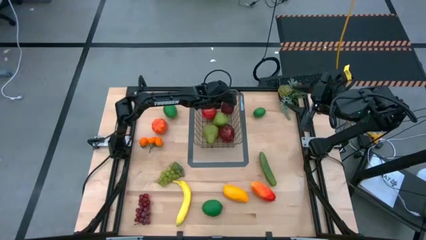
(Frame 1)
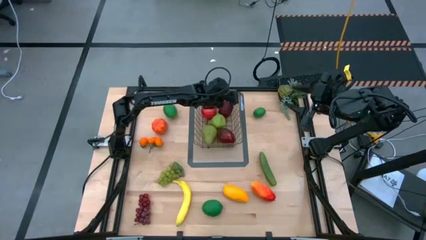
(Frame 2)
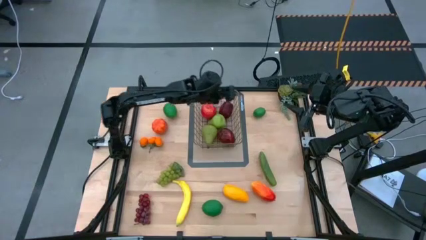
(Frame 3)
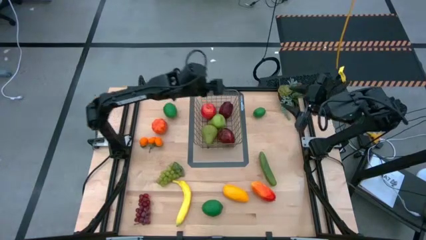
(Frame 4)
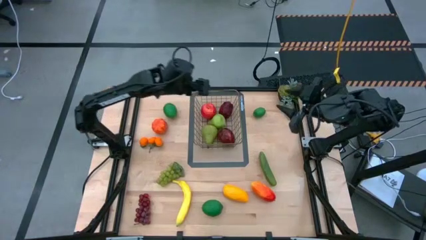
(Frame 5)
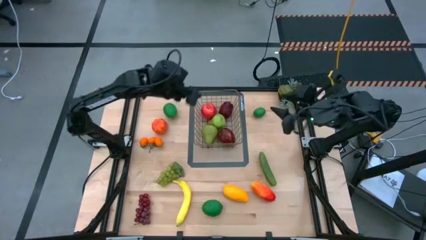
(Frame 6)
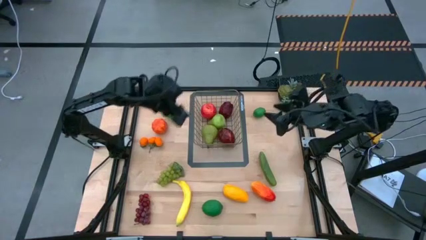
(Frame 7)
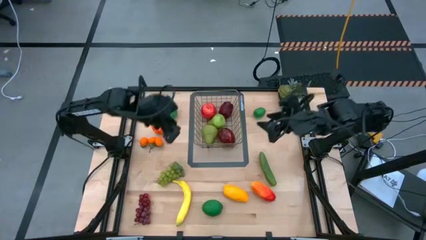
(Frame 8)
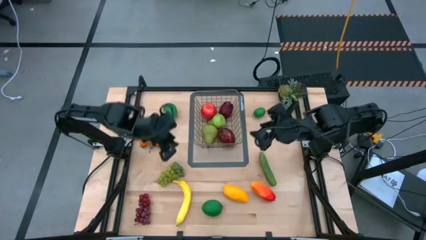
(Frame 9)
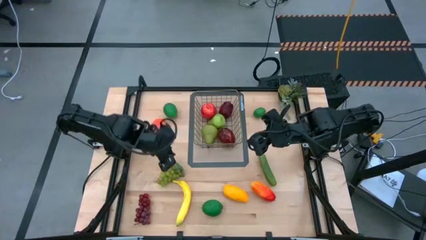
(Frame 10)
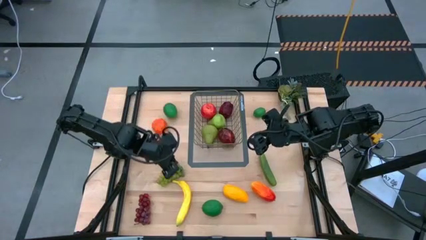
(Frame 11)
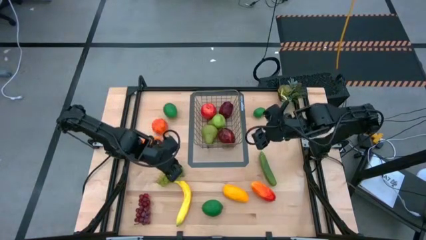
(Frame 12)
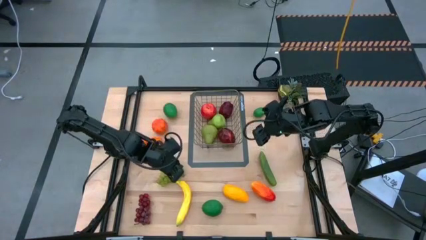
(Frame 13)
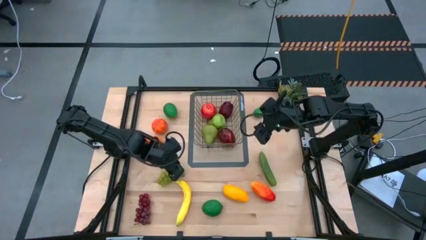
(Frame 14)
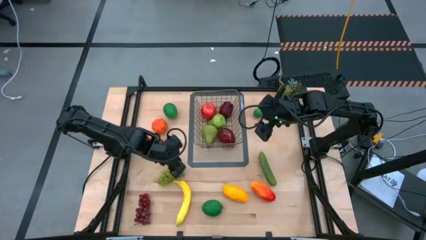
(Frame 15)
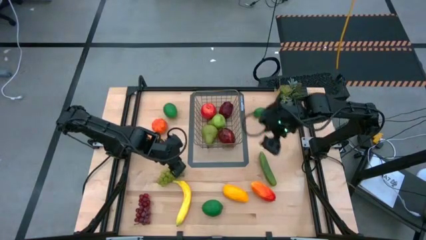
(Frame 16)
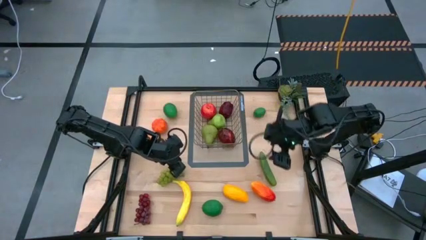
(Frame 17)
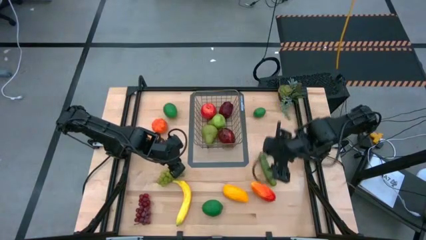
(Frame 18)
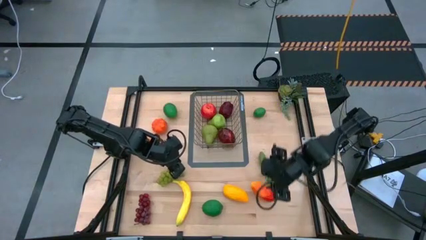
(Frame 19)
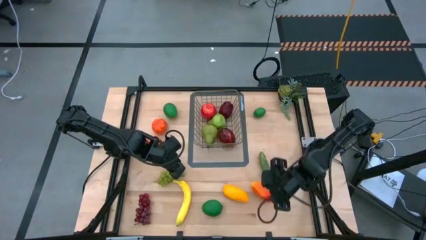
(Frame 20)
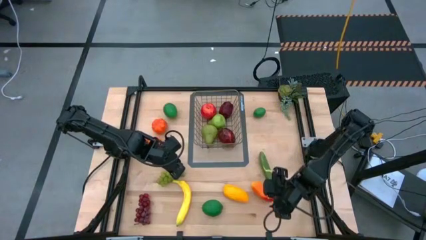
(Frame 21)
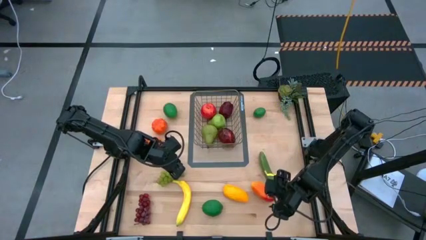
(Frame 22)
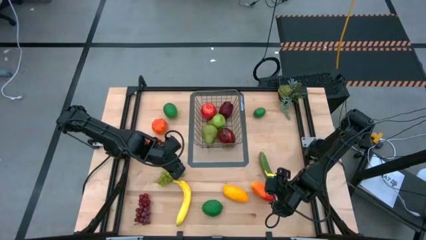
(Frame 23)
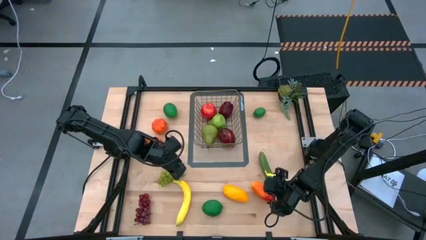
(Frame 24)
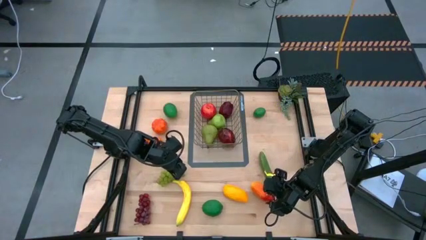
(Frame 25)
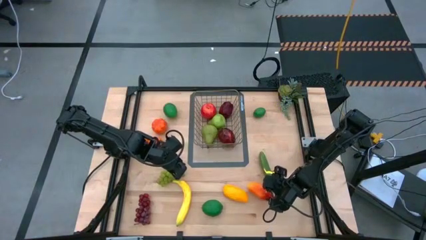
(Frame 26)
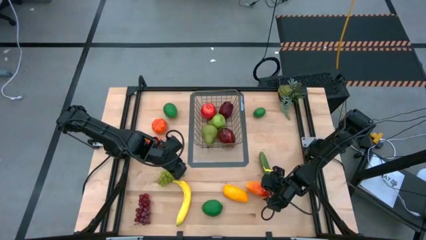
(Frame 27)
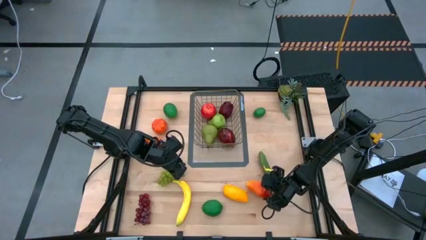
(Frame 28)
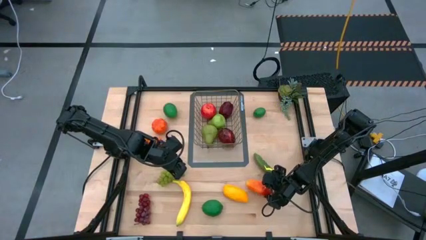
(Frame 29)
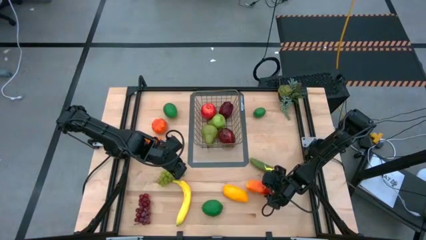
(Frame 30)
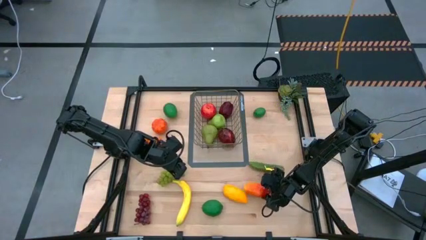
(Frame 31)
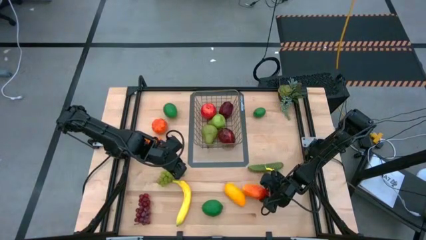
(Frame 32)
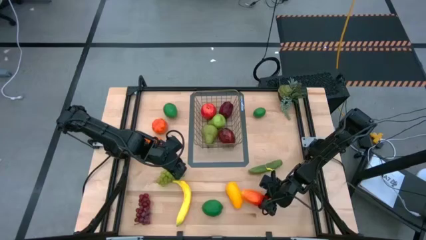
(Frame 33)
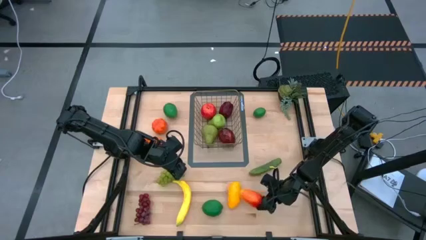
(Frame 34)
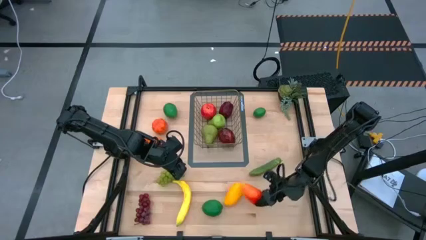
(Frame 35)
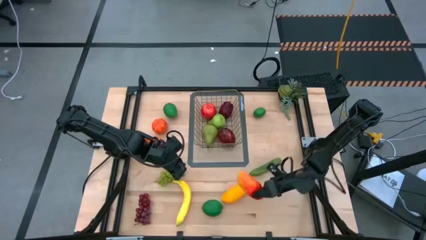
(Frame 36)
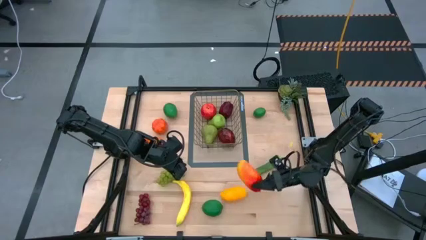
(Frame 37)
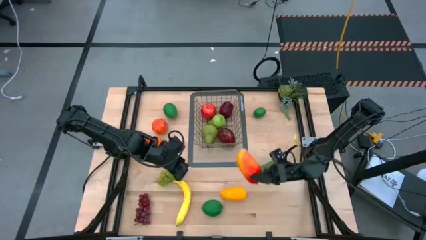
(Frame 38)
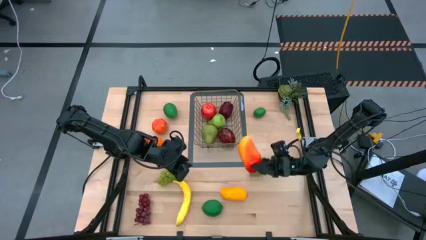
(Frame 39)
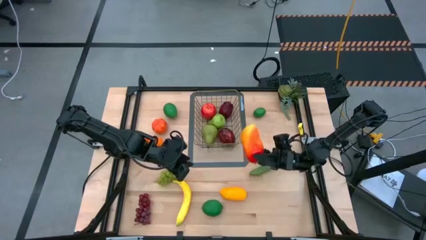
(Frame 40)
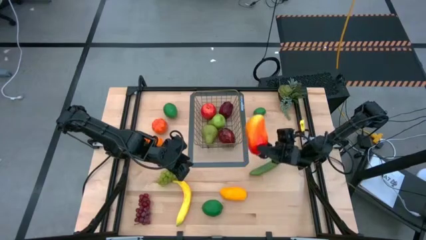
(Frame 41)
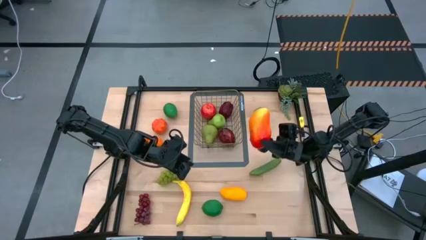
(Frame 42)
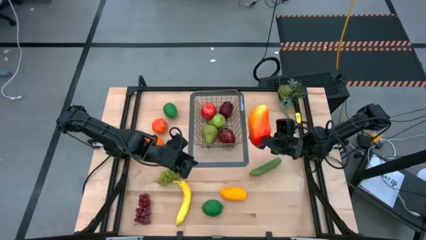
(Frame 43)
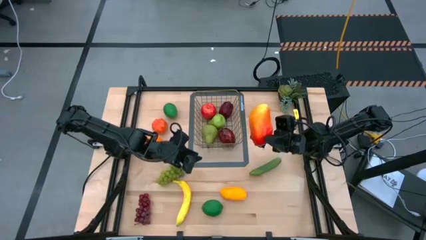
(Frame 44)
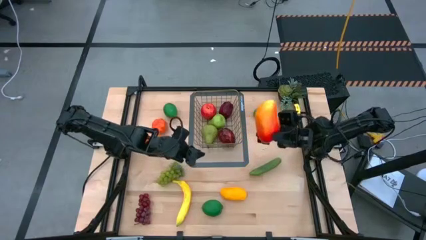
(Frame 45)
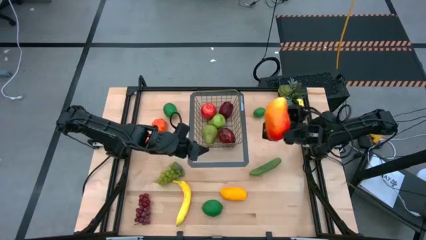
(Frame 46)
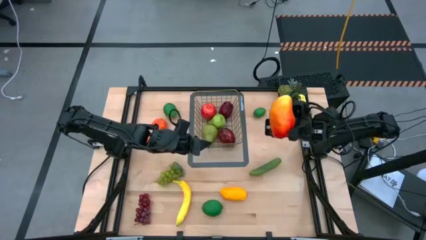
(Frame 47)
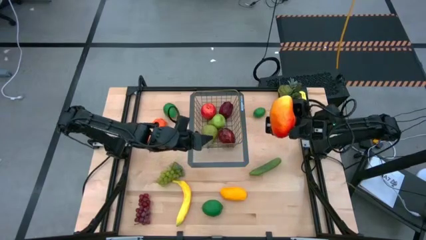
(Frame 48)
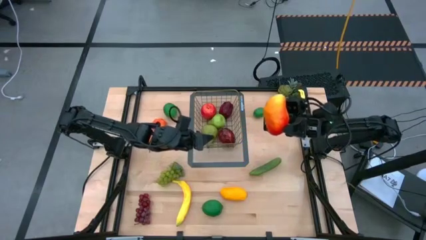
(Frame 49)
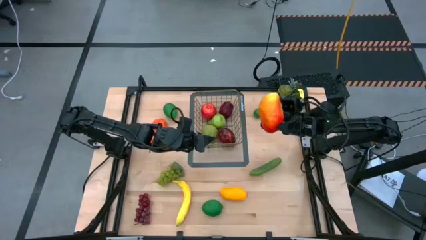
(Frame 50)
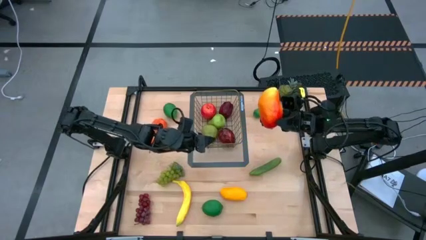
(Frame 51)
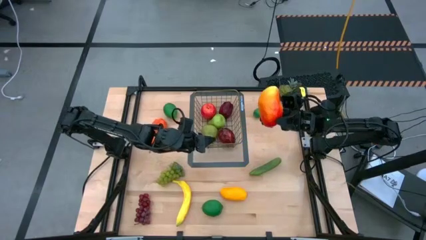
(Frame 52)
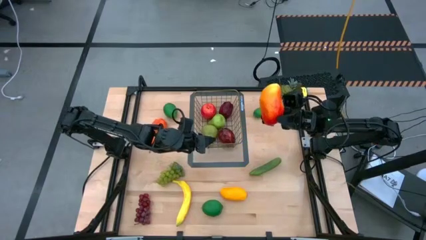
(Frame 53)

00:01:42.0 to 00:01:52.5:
Task: Build produce basket
Put the orange mango into the gold wire basket

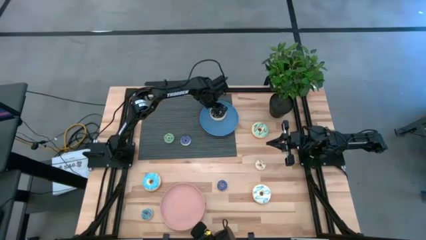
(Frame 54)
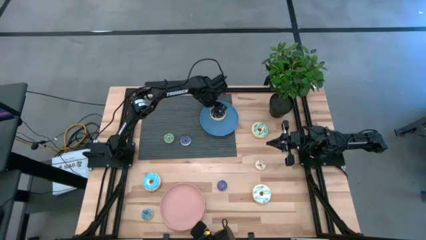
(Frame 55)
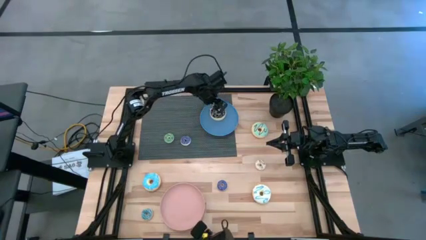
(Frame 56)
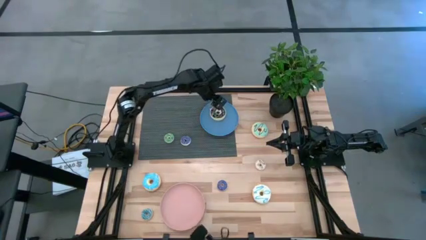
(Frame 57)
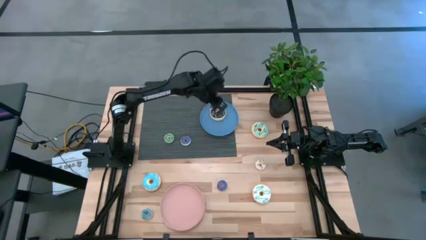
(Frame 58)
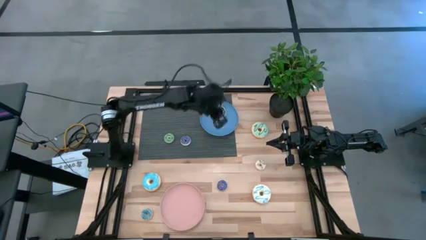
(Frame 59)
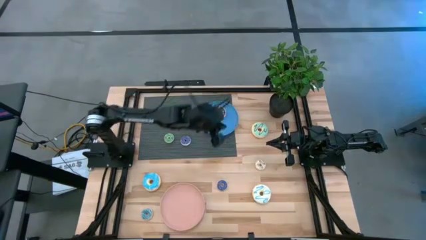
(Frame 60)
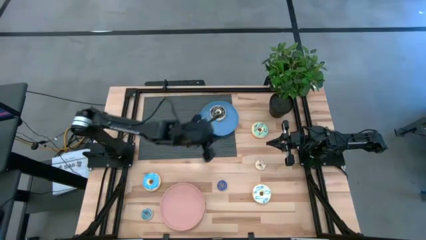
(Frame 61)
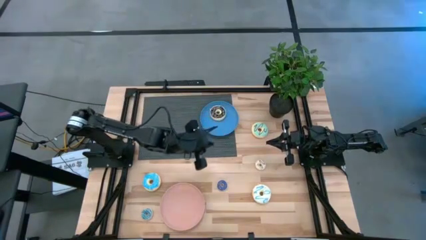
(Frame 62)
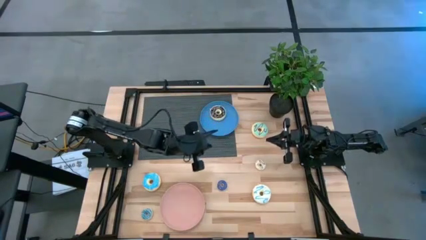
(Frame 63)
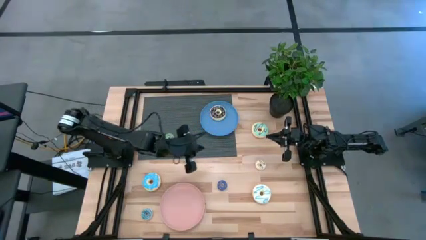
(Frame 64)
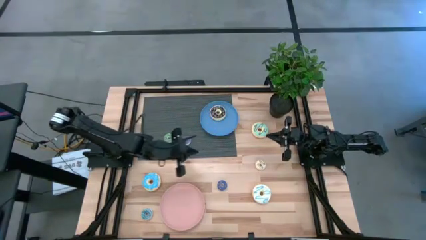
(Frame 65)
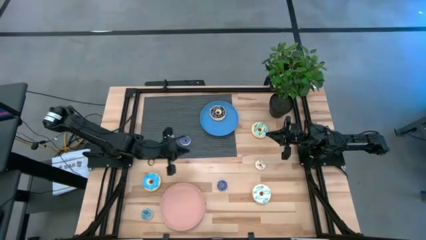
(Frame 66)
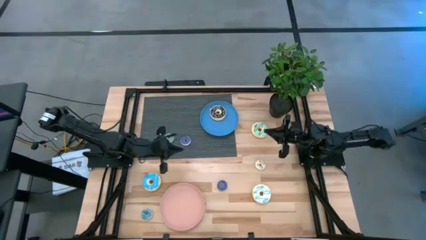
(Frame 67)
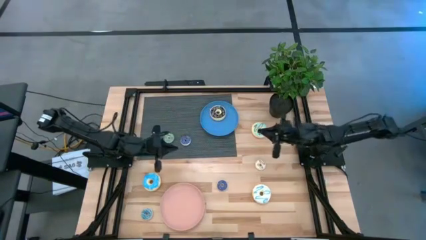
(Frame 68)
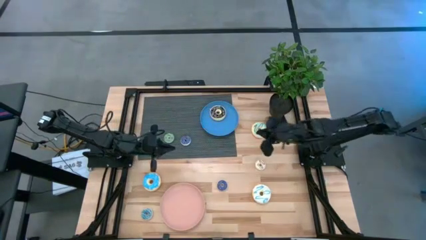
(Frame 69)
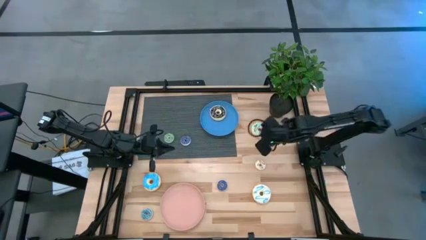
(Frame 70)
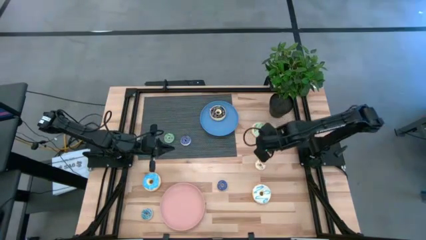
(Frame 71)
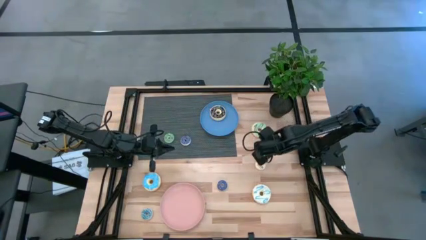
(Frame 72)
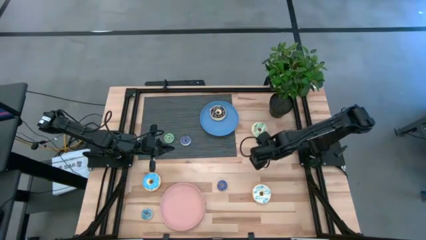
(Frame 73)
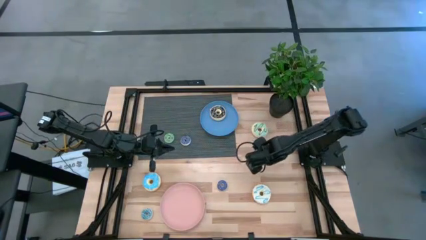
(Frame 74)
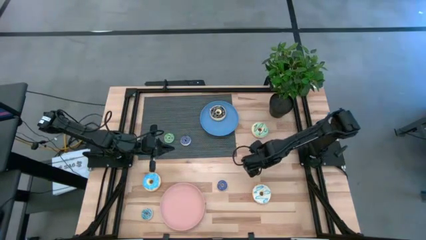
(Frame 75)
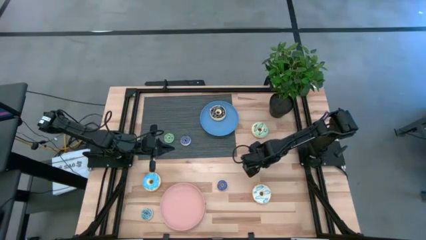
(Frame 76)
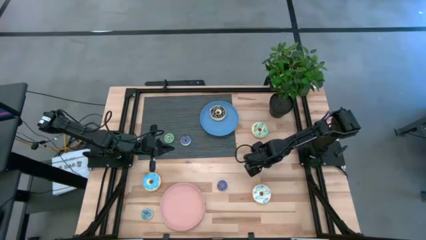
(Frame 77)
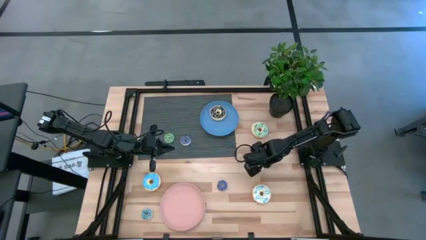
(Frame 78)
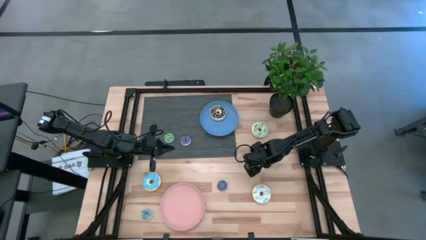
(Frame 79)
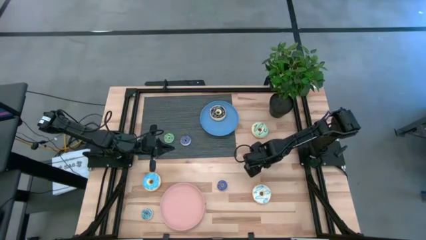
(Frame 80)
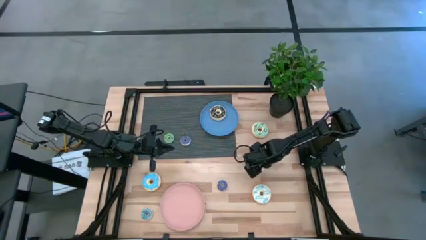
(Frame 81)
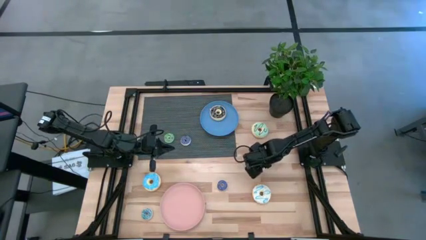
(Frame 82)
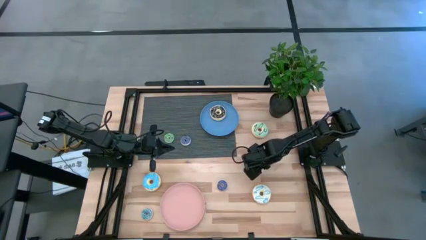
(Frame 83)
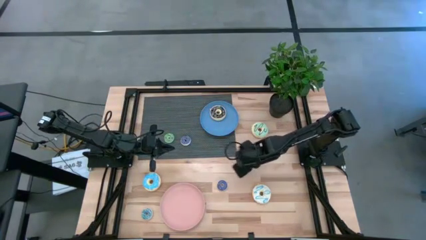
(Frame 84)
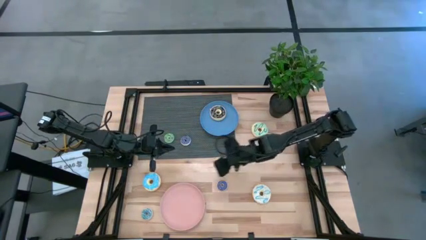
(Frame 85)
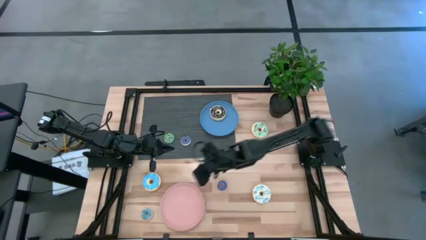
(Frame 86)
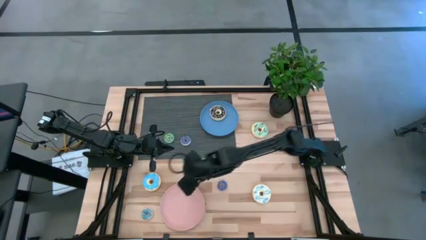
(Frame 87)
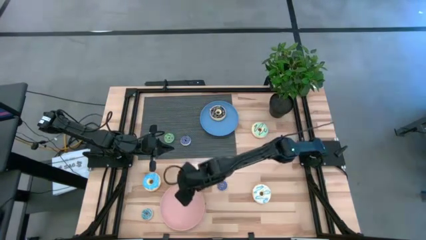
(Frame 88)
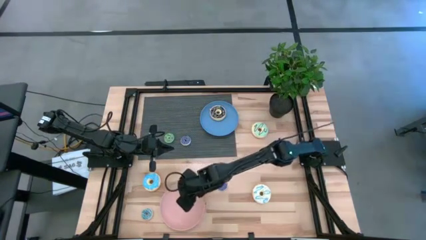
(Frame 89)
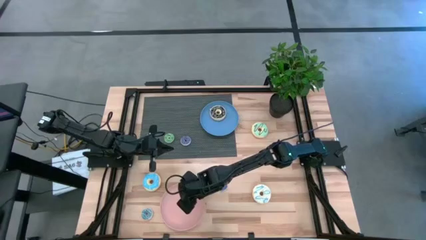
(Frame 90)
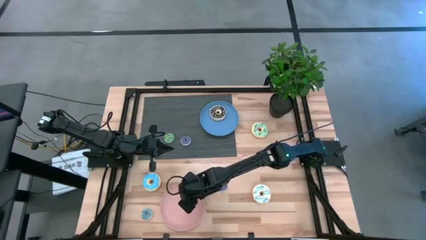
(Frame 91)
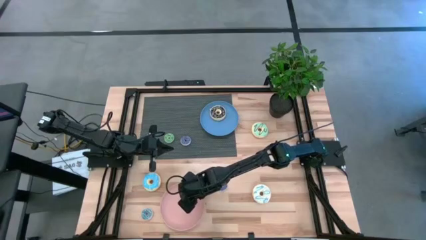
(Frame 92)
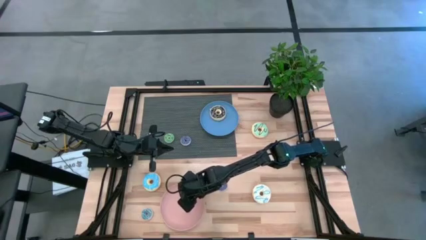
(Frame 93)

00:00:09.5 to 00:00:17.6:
Task: Pick & Place donuts
Put the small white donut on the pink plate
